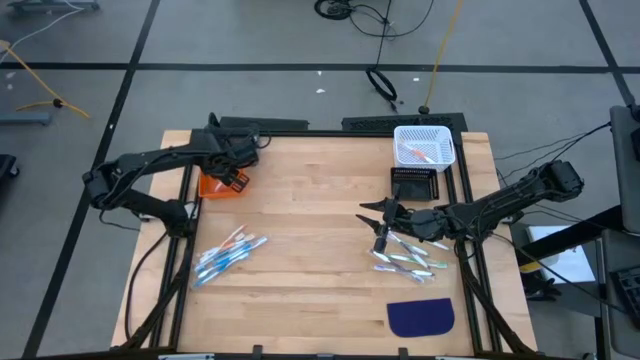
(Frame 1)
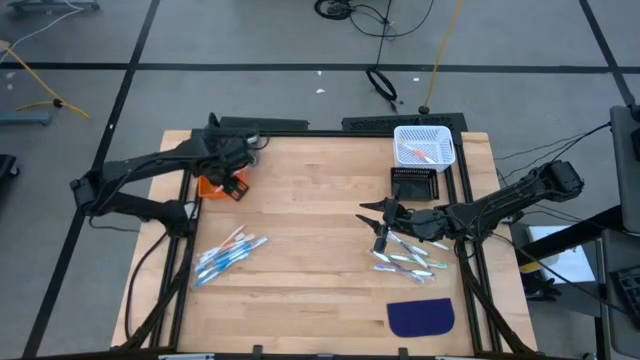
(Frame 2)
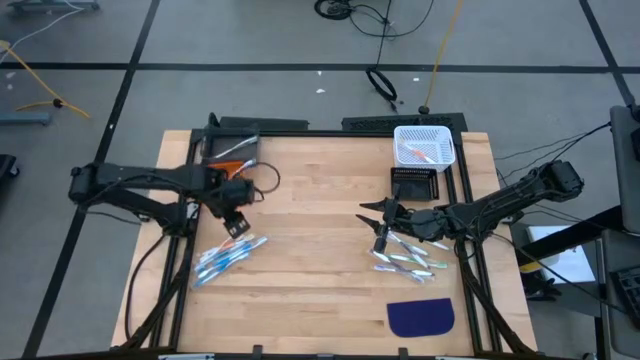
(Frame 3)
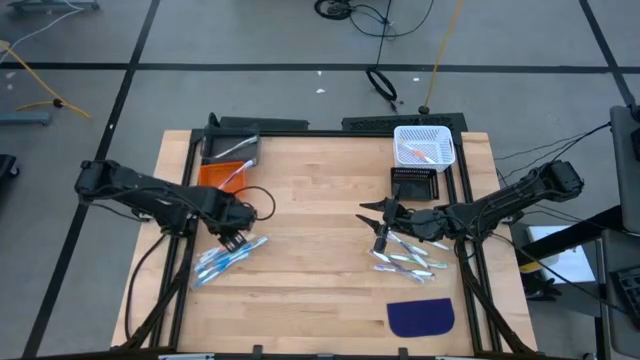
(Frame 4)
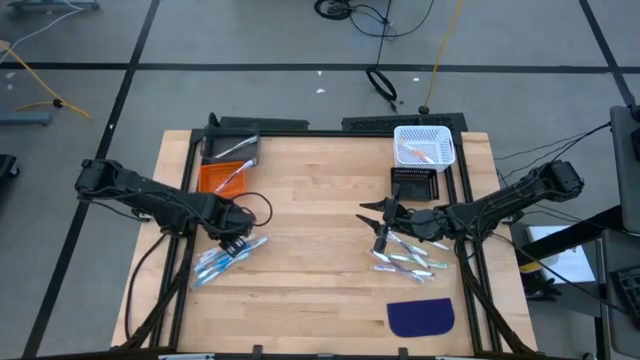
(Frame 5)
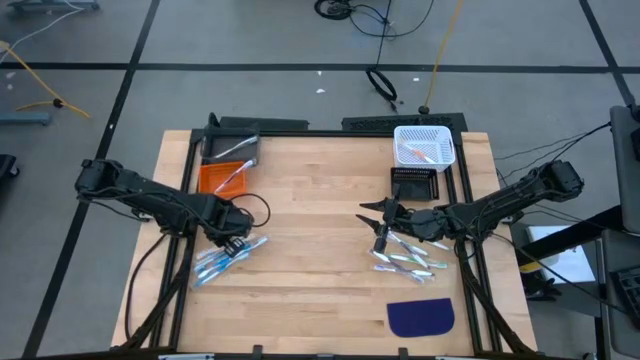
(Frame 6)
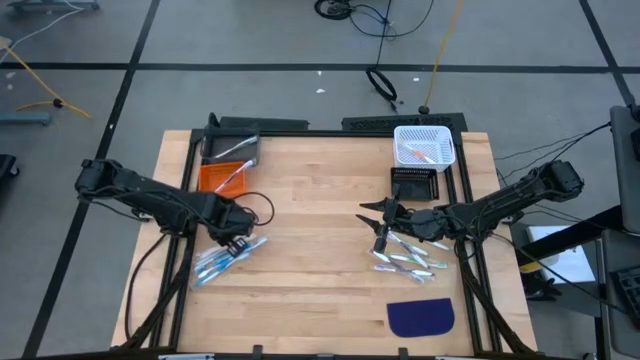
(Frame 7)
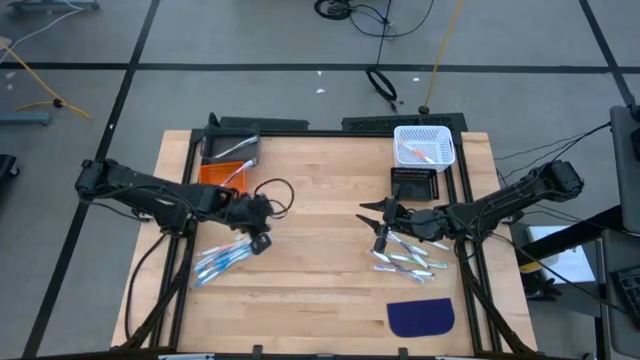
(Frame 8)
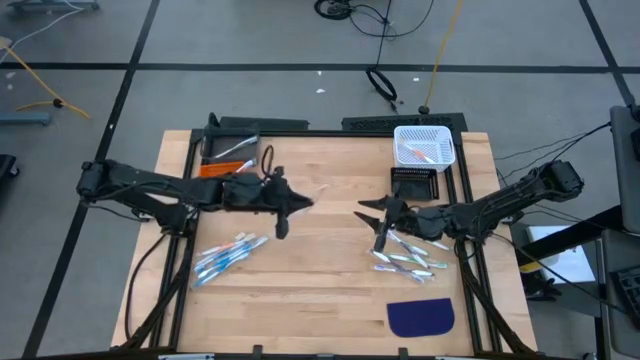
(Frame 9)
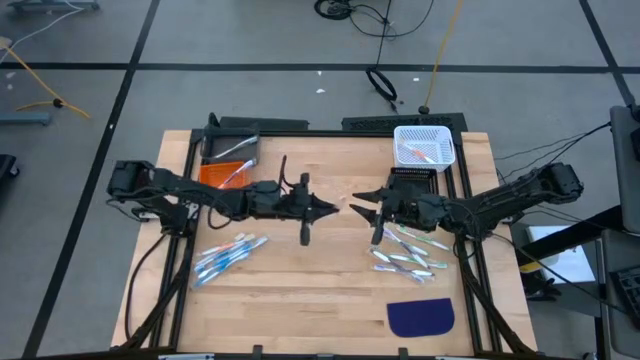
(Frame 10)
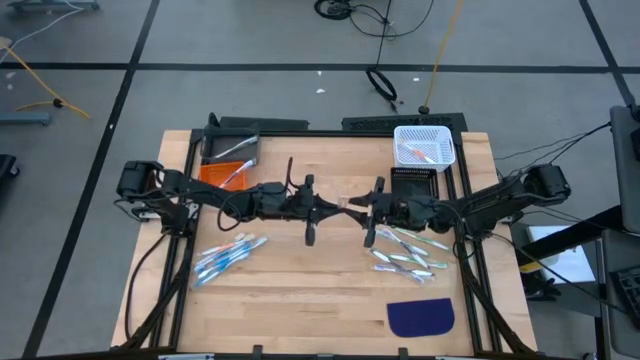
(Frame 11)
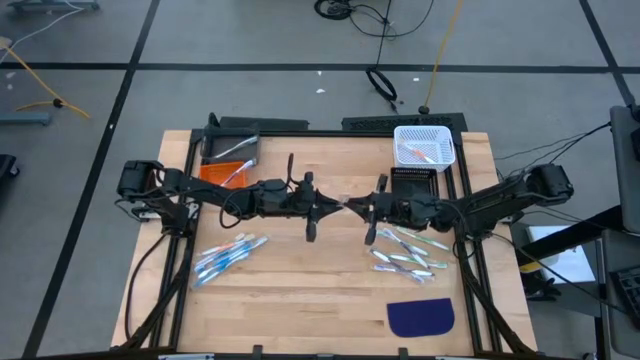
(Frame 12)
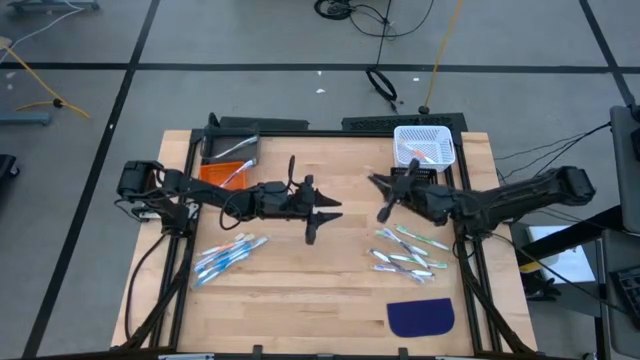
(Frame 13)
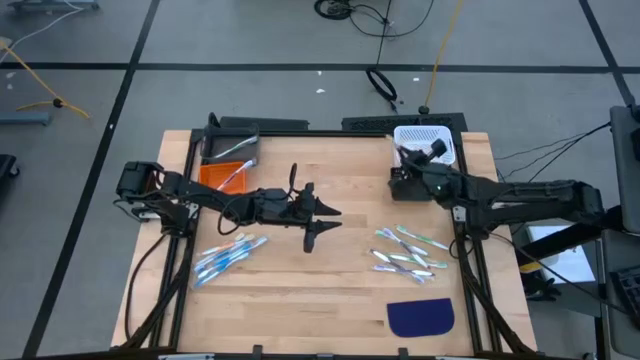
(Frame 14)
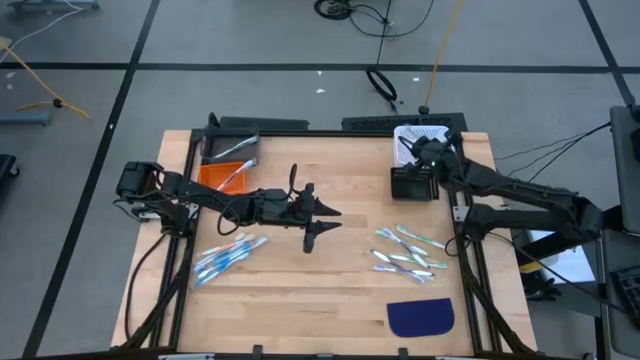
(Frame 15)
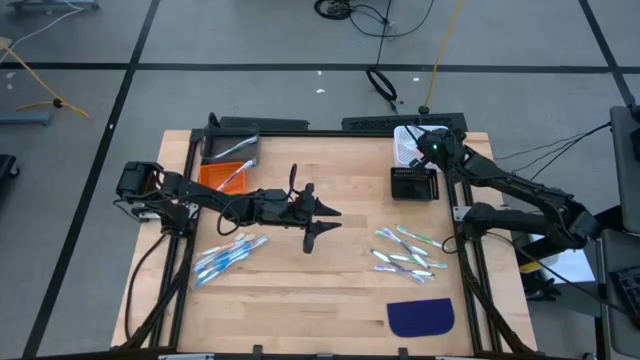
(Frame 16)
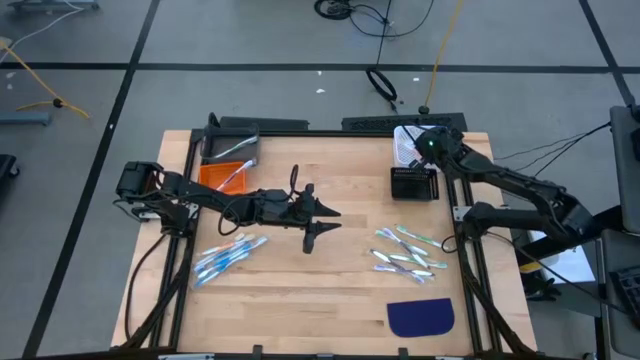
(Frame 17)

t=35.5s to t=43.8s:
Task: Pick & Place Toothbrushes
Put the orange toothbrush into the white bin

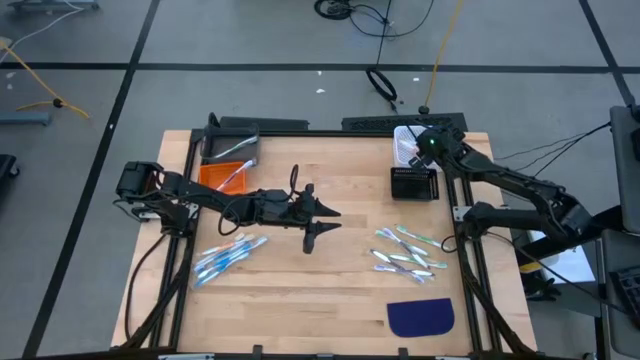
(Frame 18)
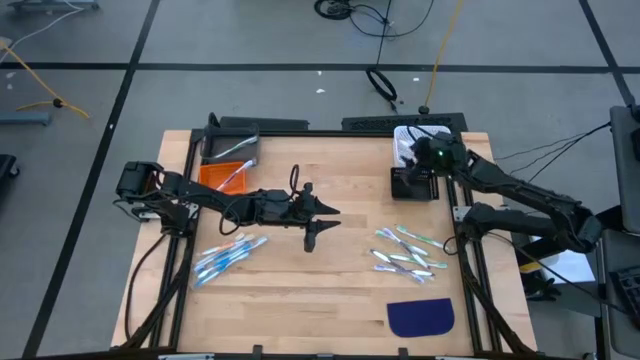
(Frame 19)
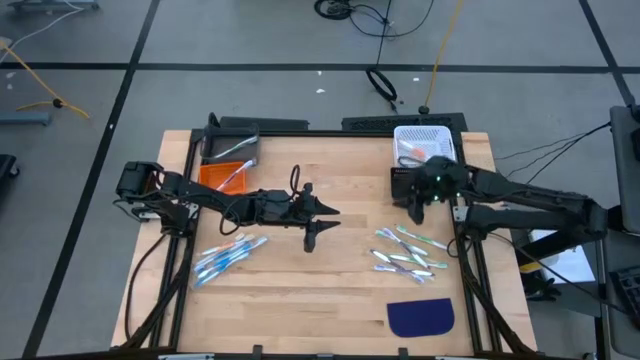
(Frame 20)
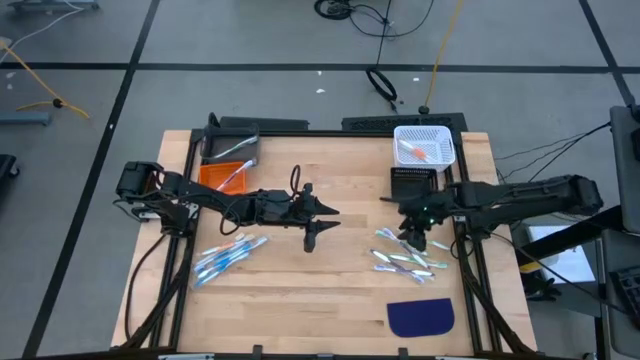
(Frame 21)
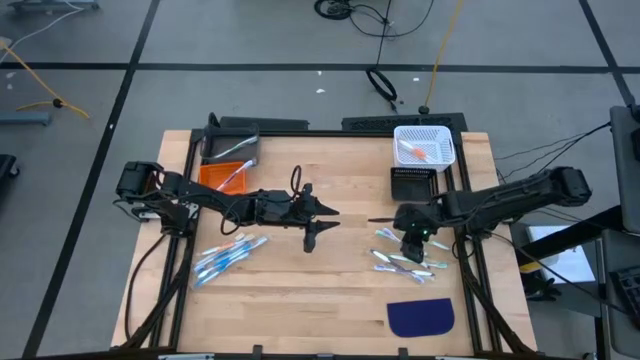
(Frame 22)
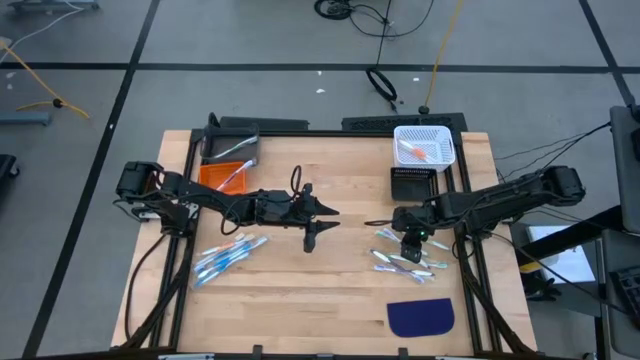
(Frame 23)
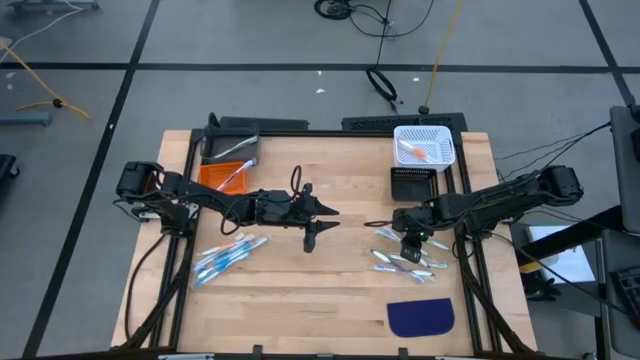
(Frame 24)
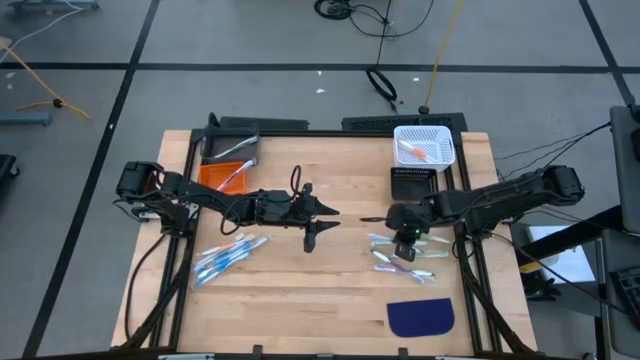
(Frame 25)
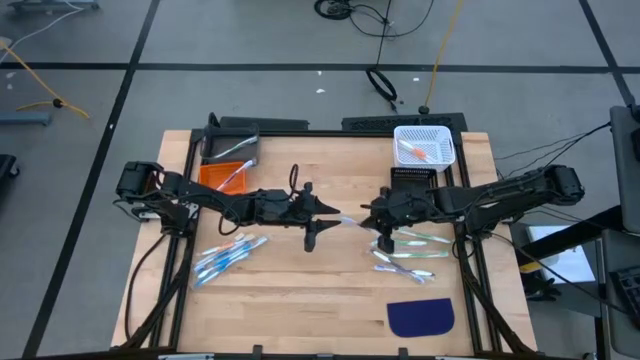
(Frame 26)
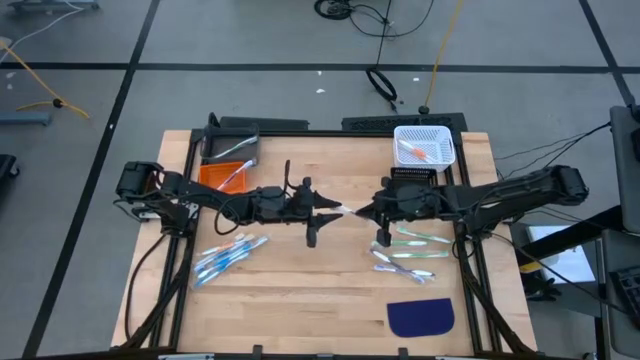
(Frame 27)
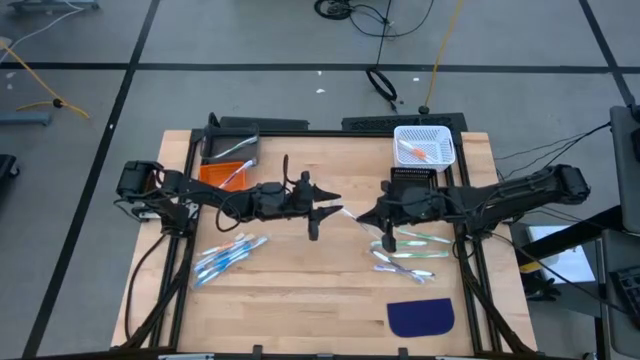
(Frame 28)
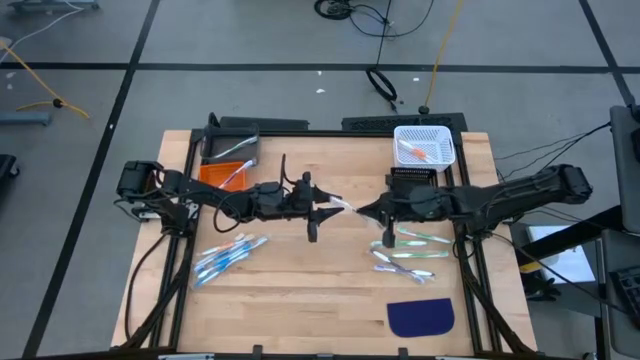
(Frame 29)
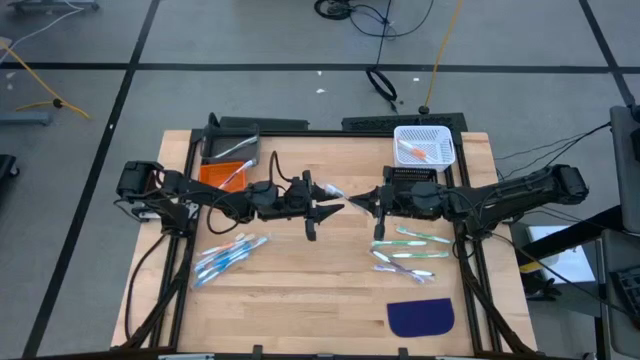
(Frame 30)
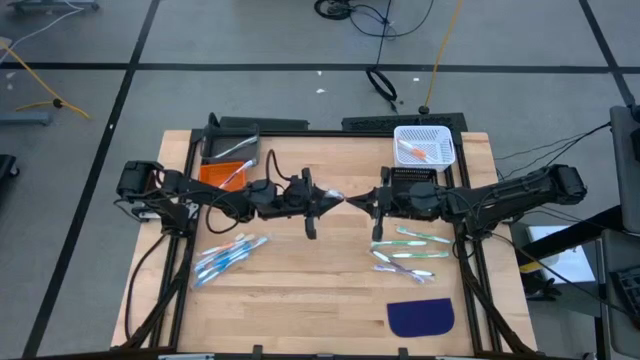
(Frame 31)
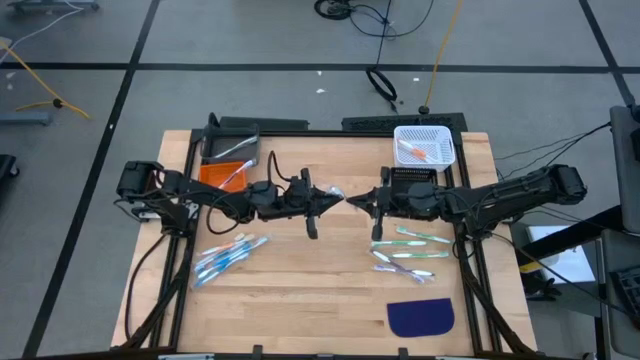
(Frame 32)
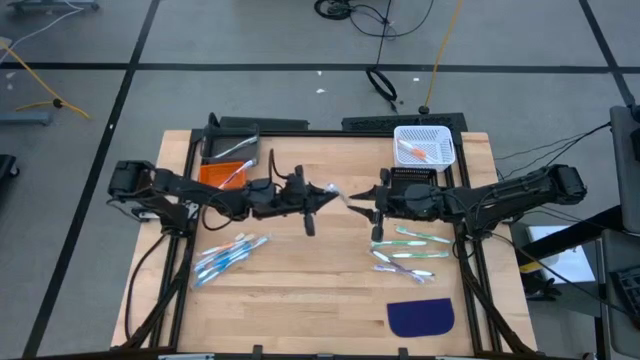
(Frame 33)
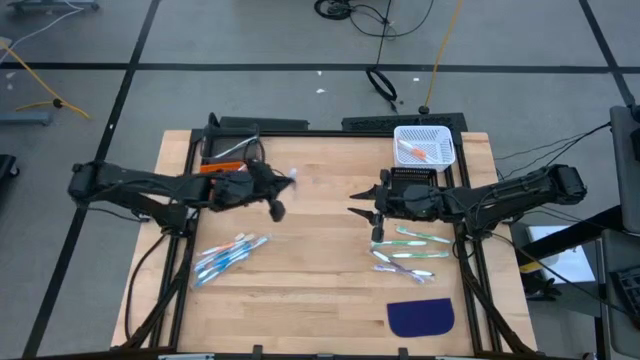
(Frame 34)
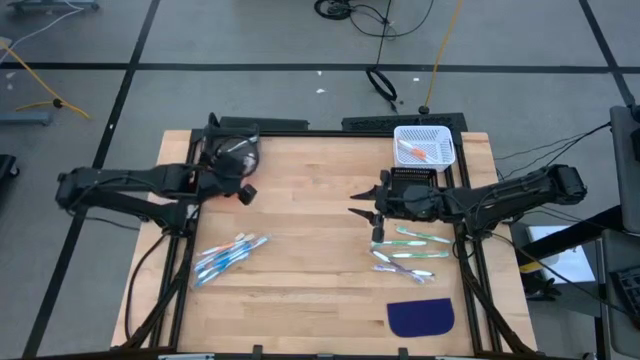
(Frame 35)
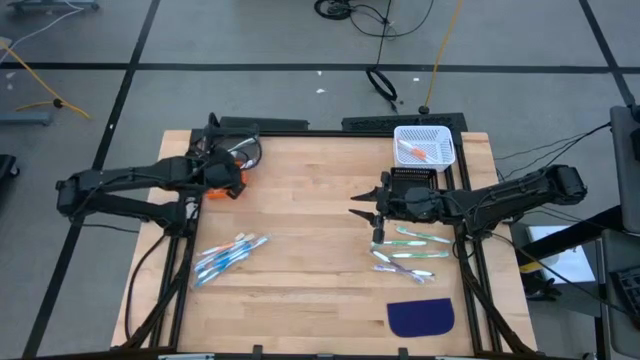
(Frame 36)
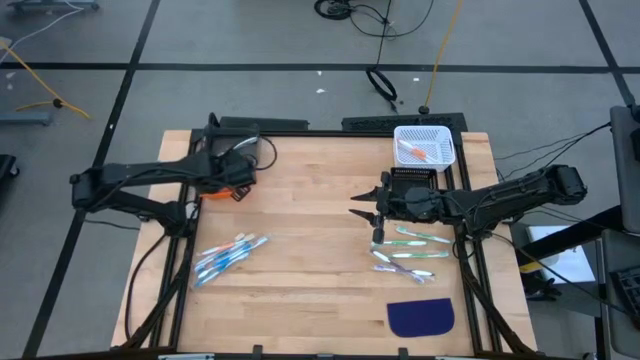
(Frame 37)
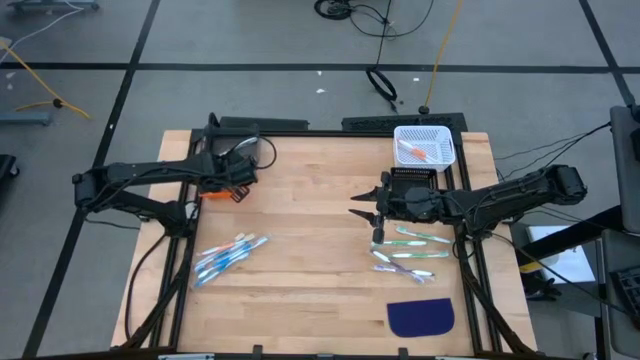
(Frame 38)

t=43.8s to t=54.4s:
Put the purple toothbrush into the orange bin

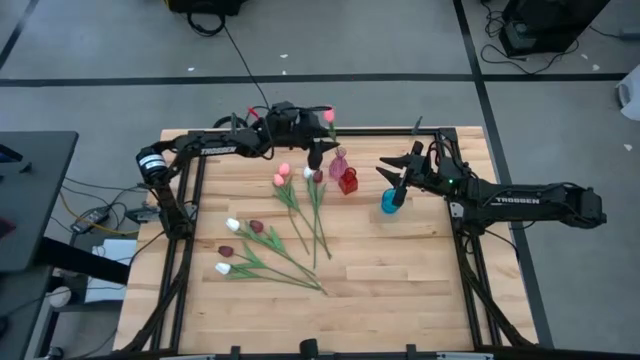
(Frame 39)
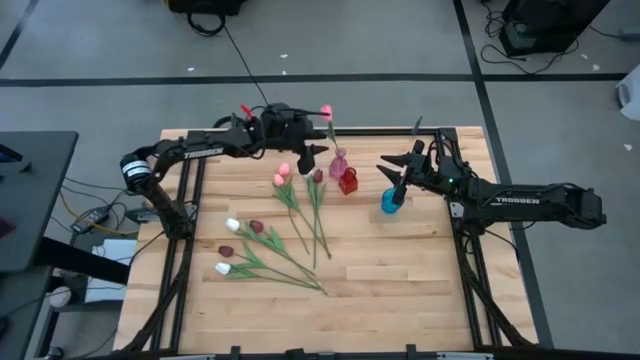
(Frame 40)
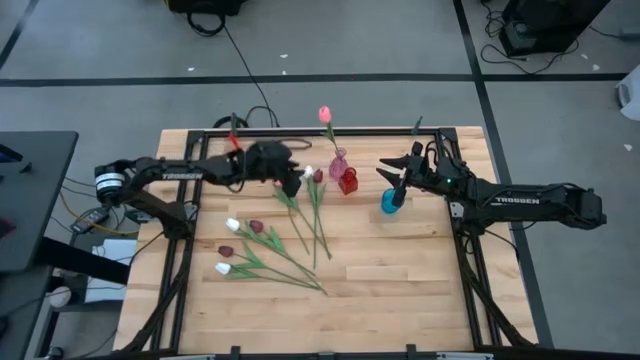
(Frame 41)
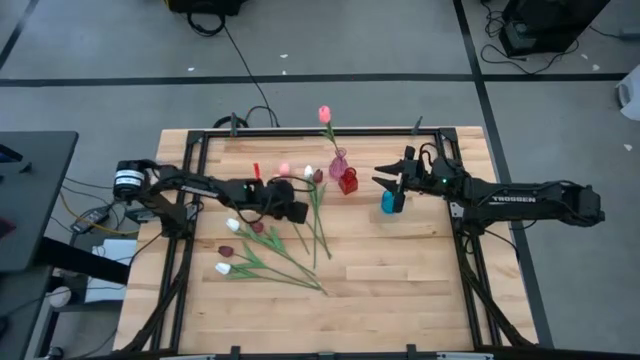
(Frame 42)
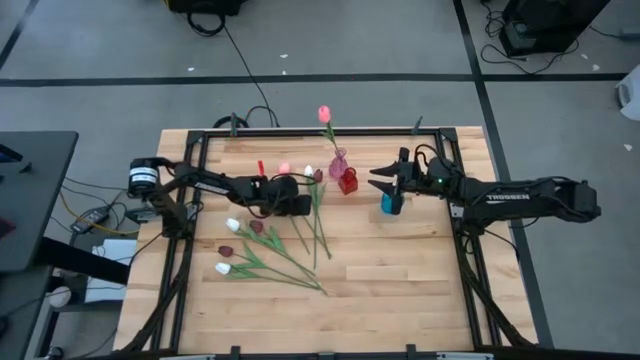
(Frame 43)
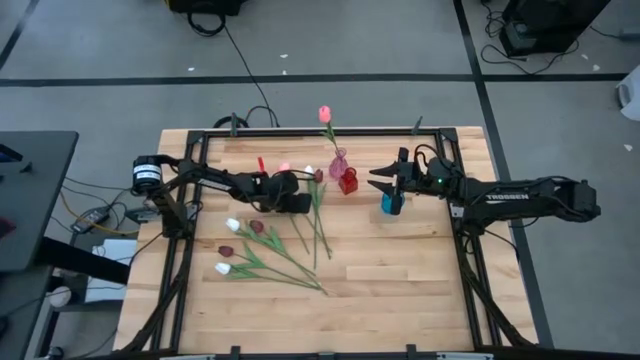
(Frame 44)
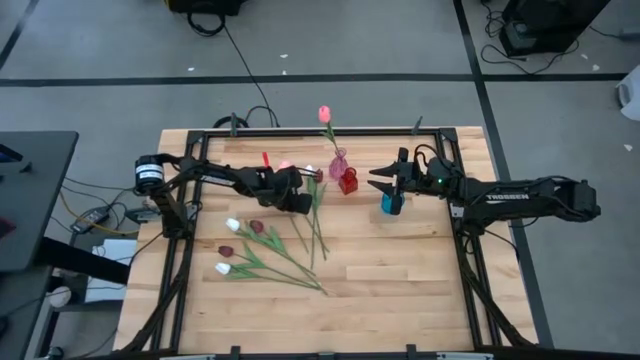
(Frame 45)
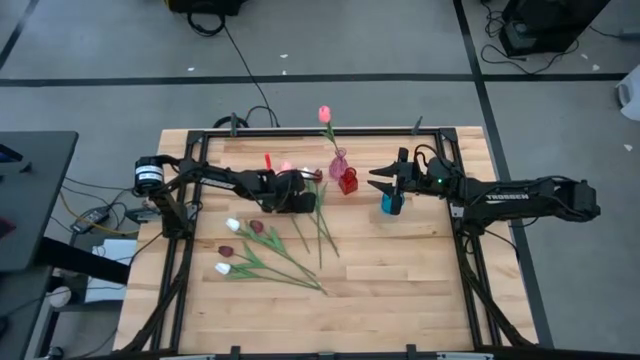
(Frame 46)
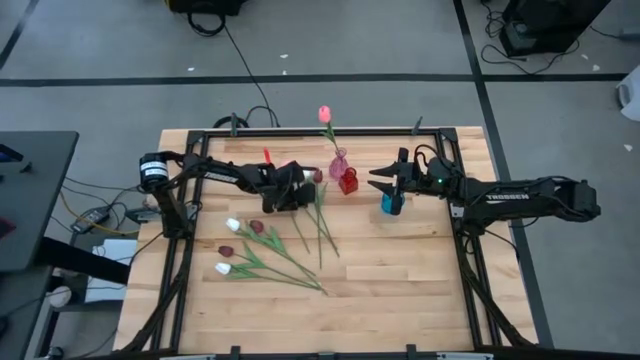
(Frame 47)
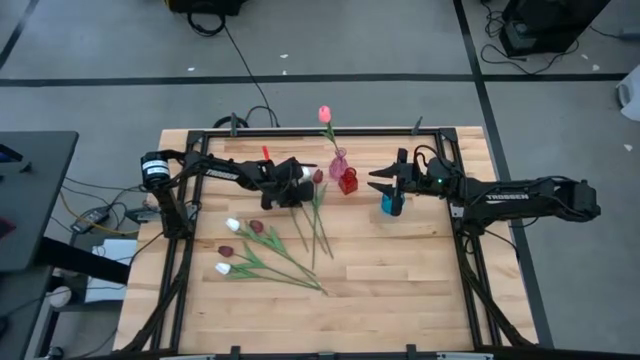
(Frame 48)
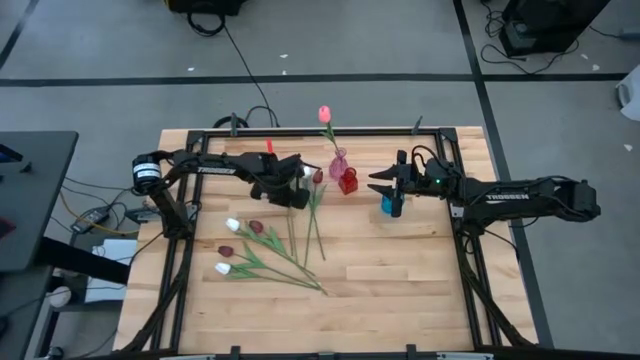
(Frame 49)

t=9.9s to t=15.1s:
Task: Sort flowers into vase by color
Put the bottom pink flower into the pink vase
